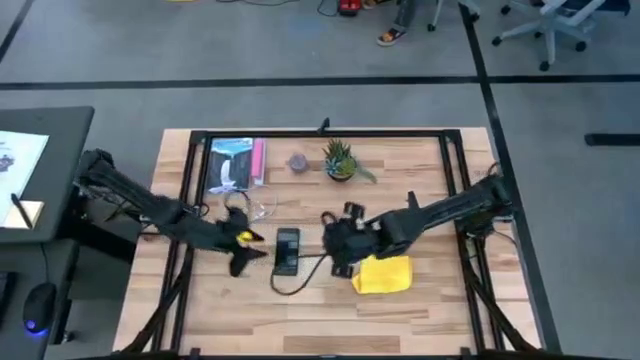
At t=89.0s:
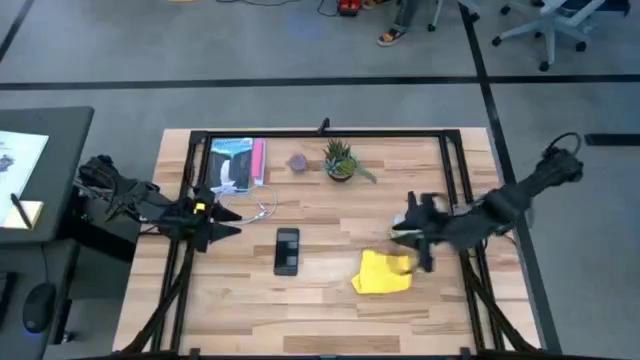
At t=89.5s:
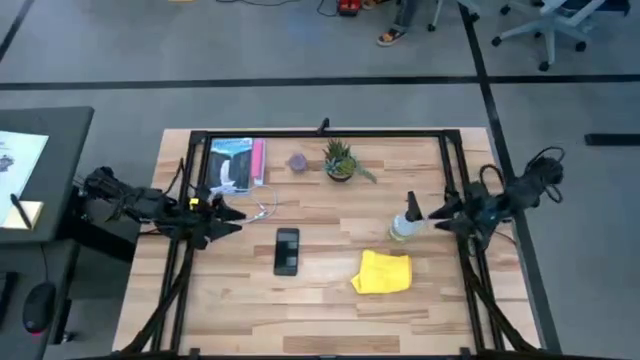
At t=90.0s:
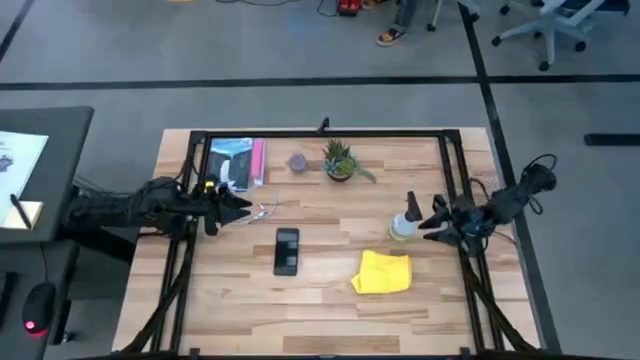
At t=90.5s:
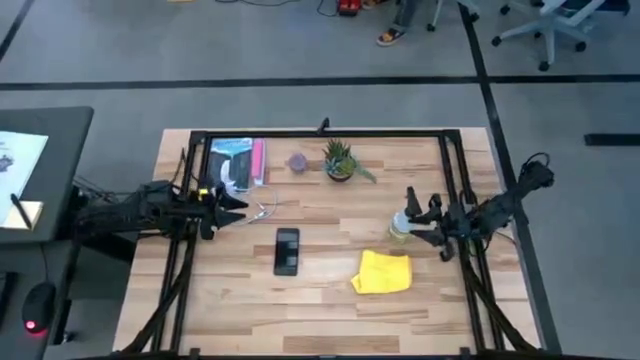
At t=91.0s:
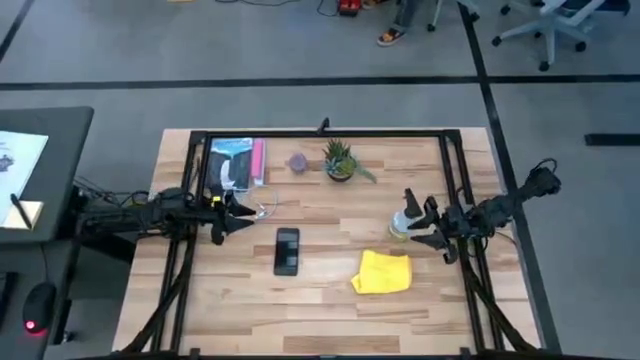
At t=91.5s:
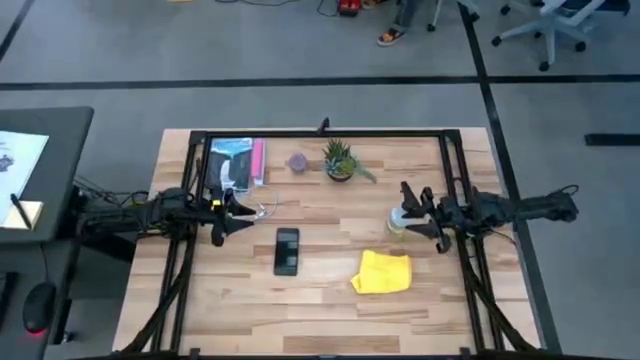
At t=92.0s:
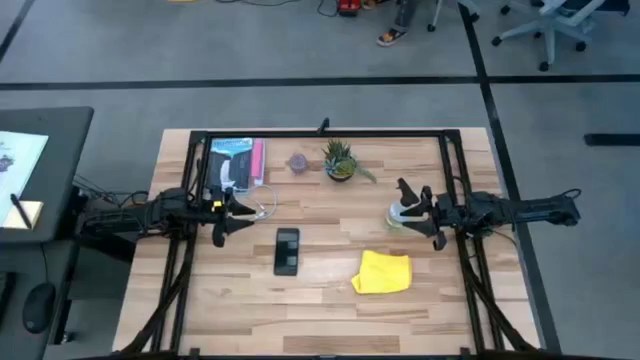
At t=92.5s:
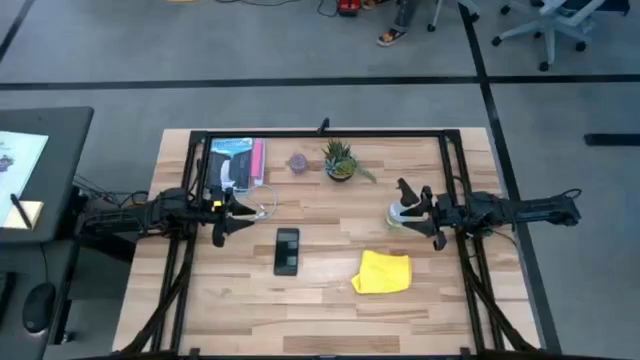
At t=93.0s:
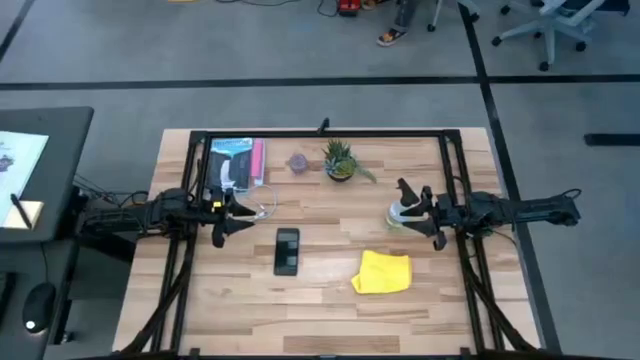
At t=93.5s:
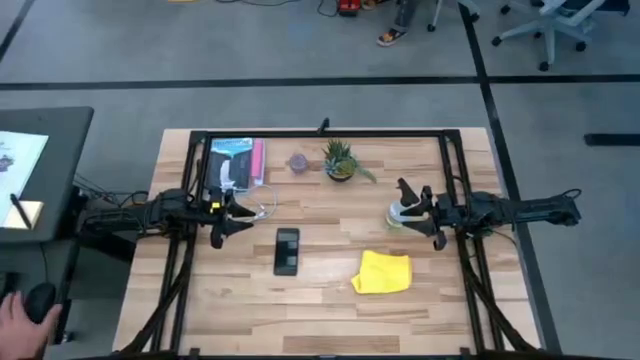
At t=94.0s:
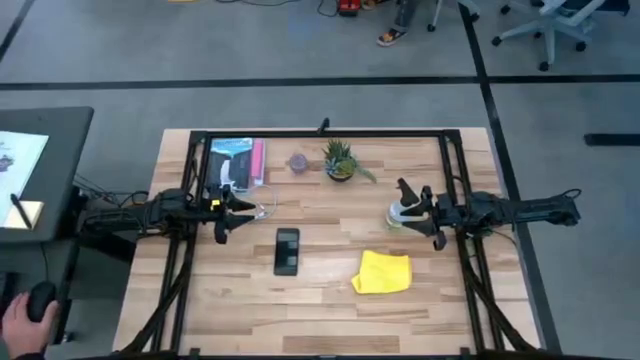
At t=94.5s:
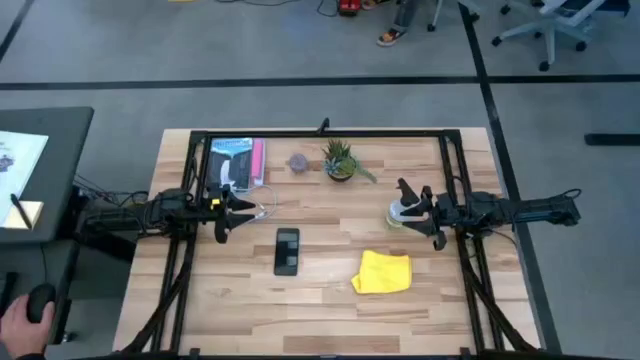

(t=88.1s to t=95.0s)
Task: Apply microfiber cloth
Return to Home Position

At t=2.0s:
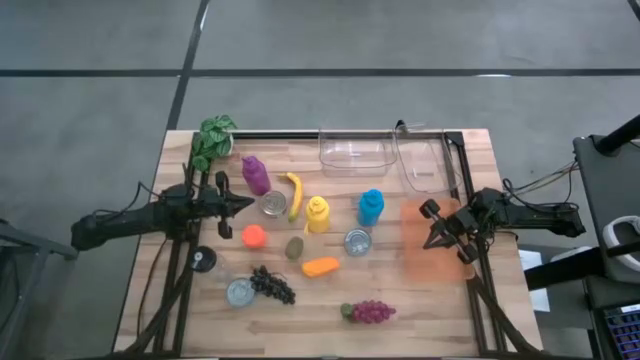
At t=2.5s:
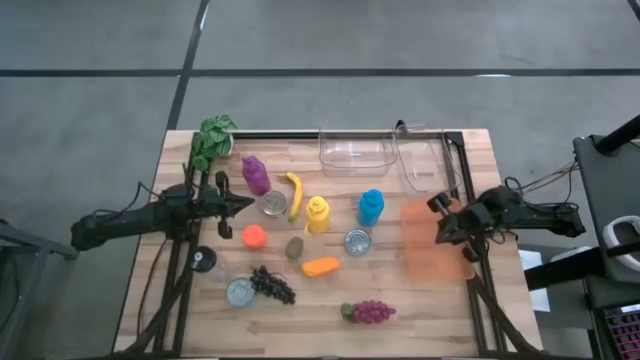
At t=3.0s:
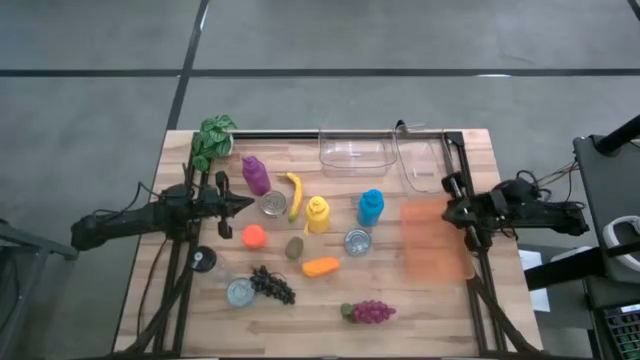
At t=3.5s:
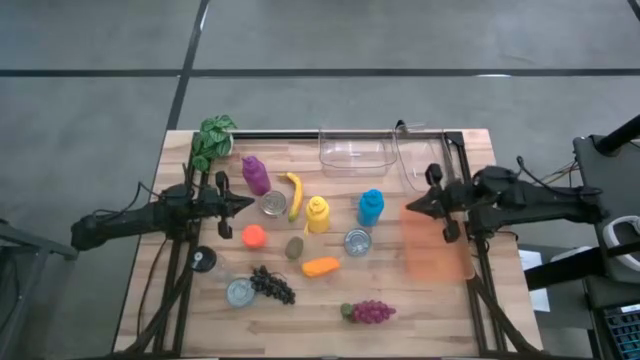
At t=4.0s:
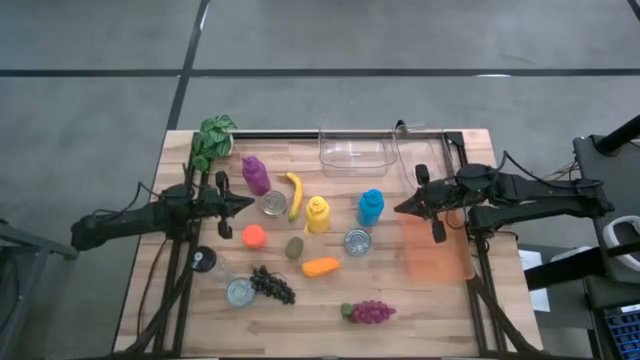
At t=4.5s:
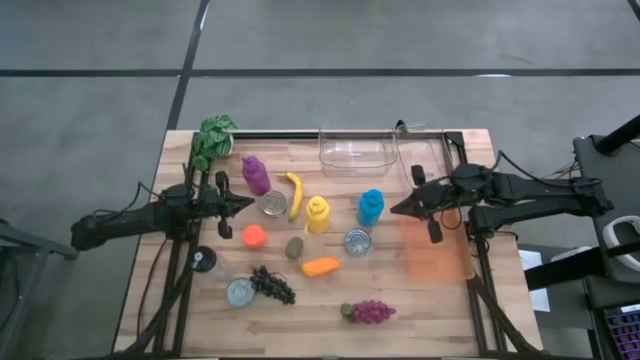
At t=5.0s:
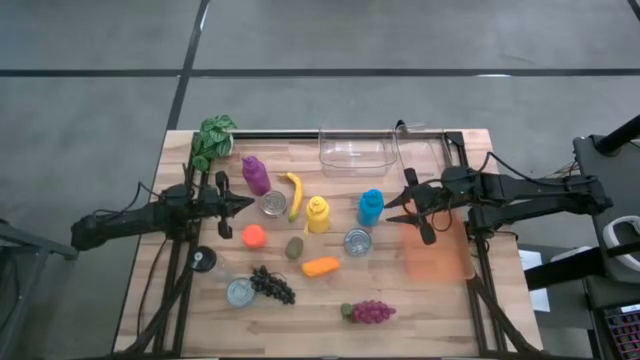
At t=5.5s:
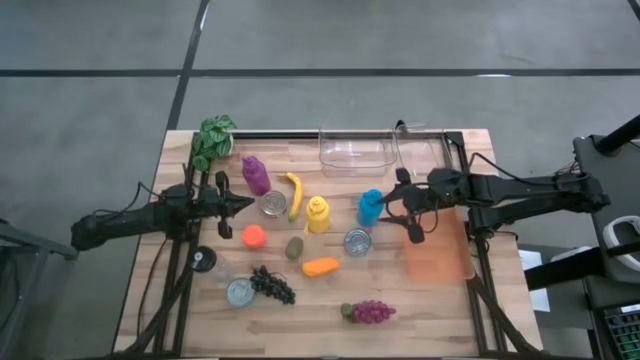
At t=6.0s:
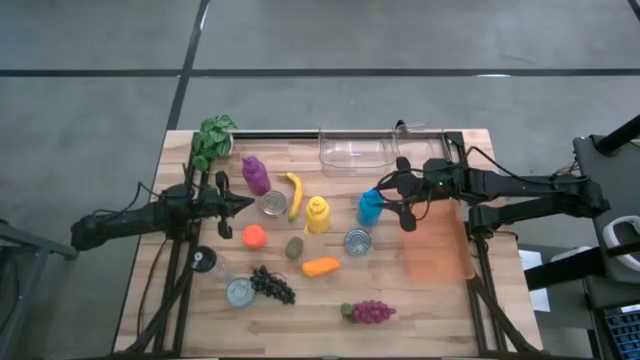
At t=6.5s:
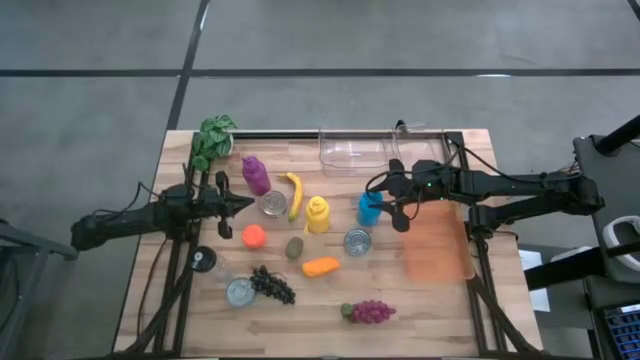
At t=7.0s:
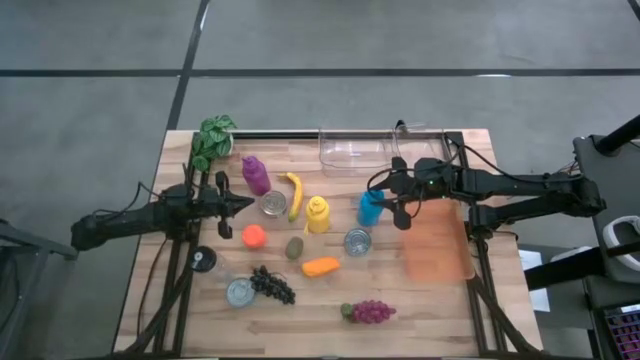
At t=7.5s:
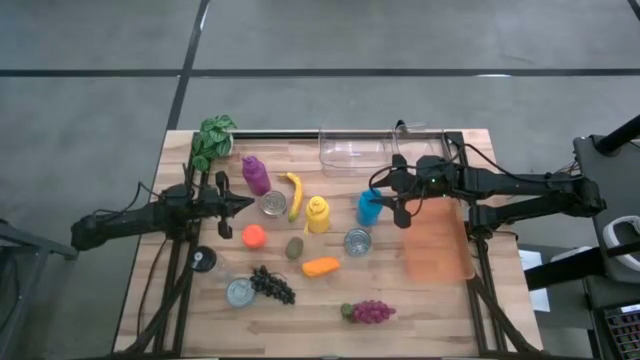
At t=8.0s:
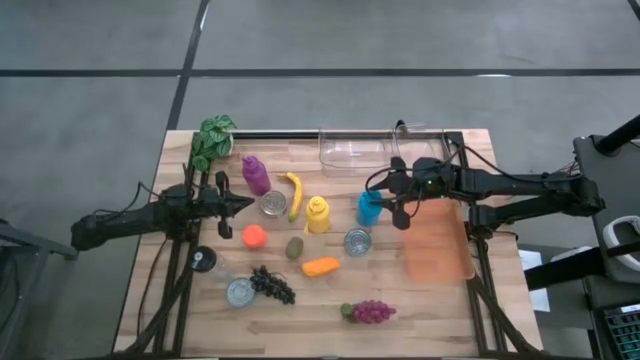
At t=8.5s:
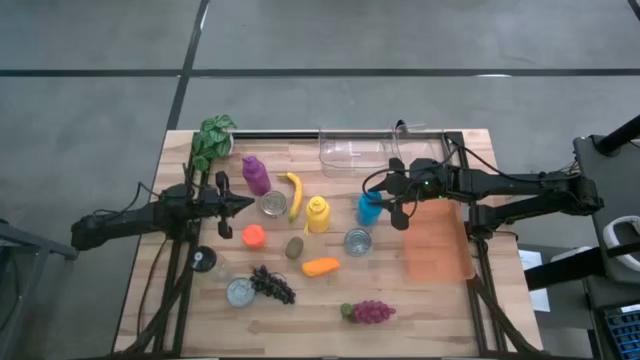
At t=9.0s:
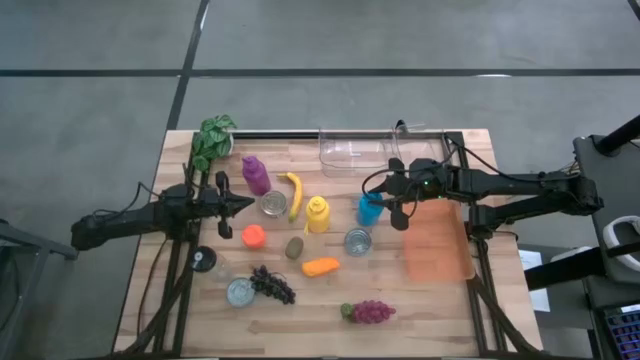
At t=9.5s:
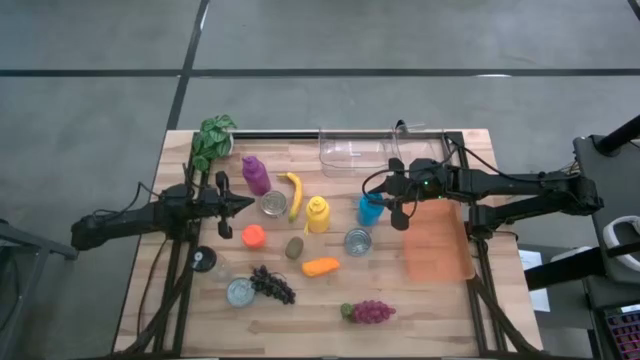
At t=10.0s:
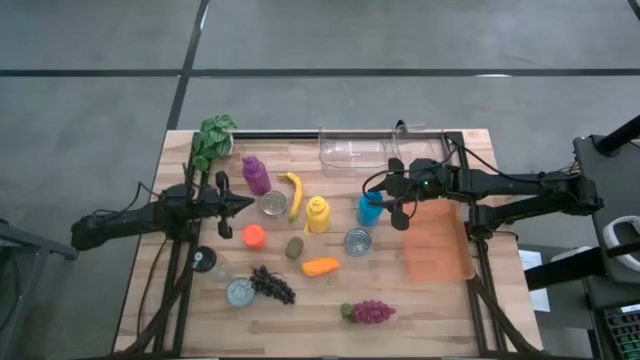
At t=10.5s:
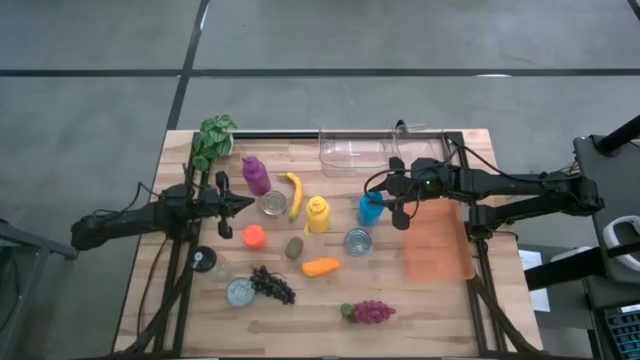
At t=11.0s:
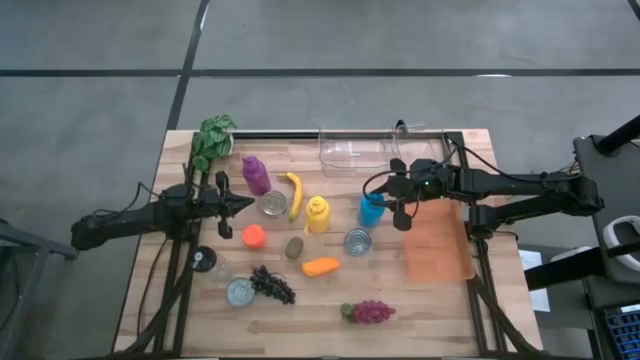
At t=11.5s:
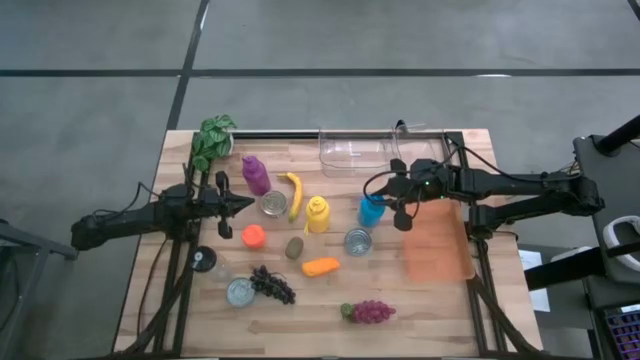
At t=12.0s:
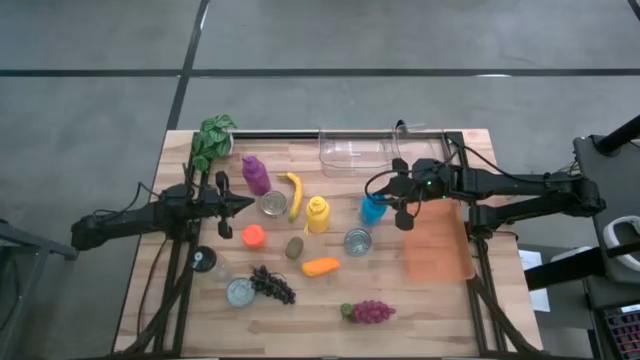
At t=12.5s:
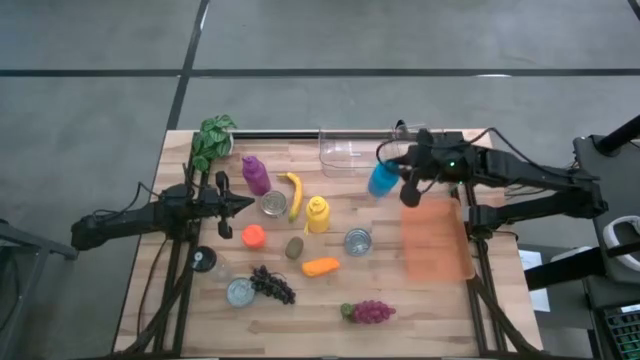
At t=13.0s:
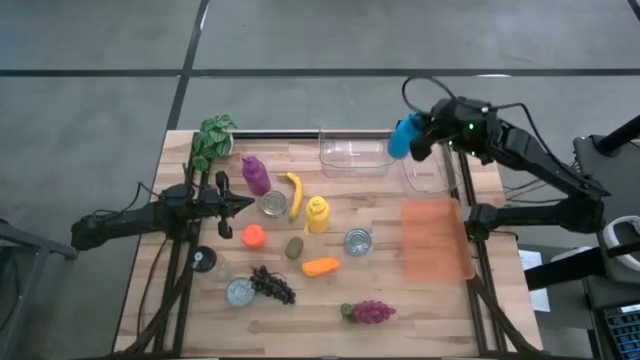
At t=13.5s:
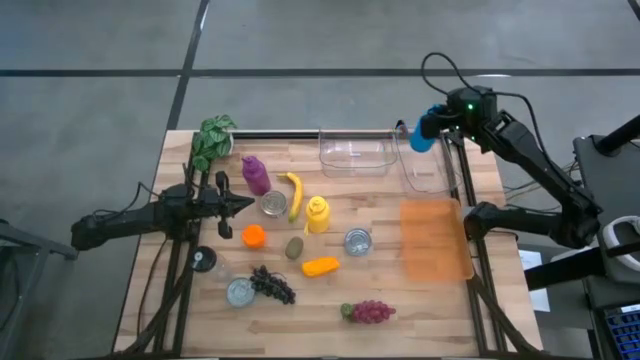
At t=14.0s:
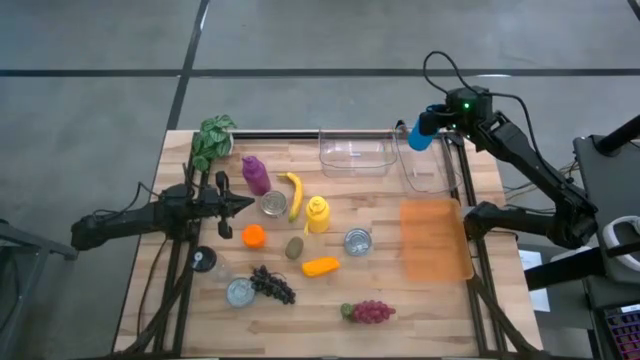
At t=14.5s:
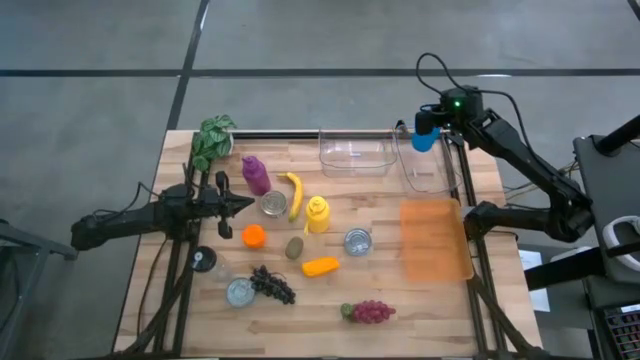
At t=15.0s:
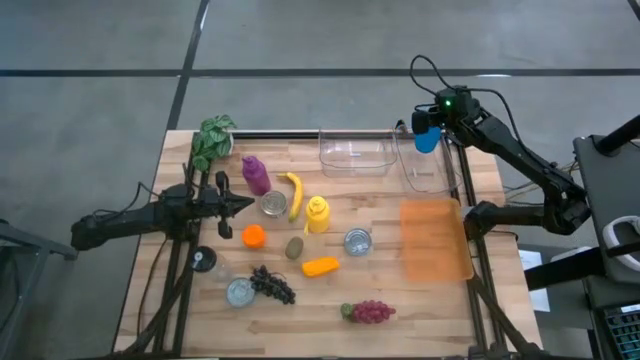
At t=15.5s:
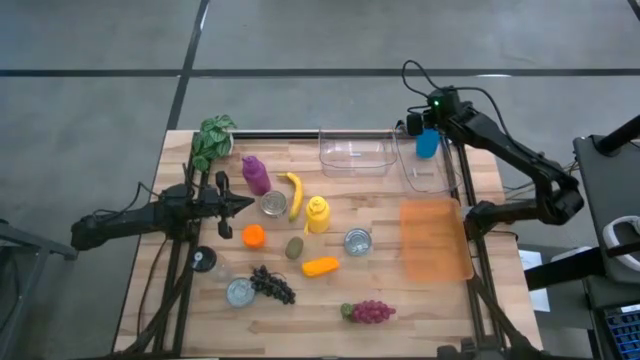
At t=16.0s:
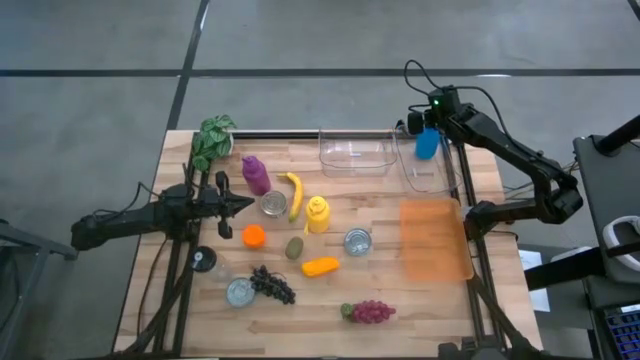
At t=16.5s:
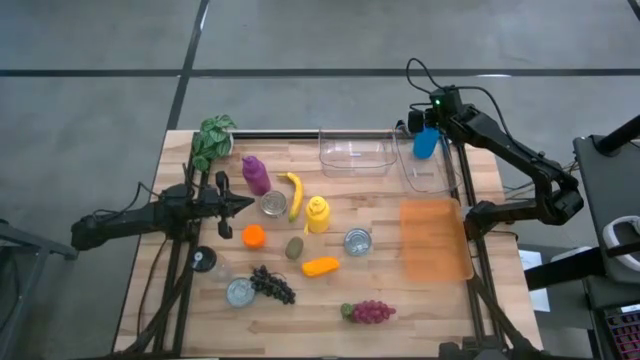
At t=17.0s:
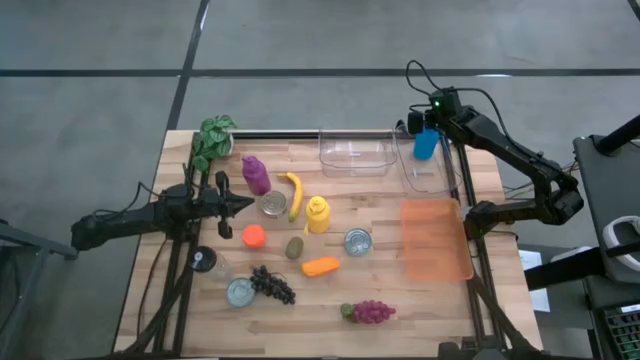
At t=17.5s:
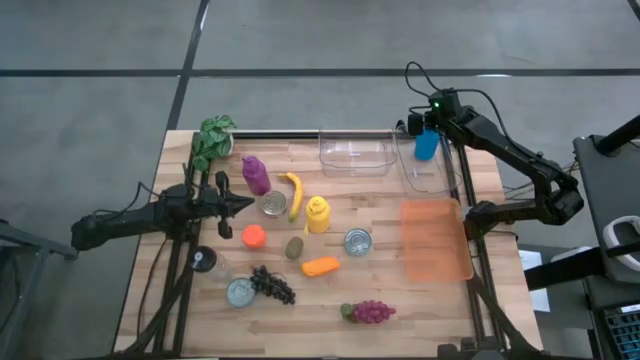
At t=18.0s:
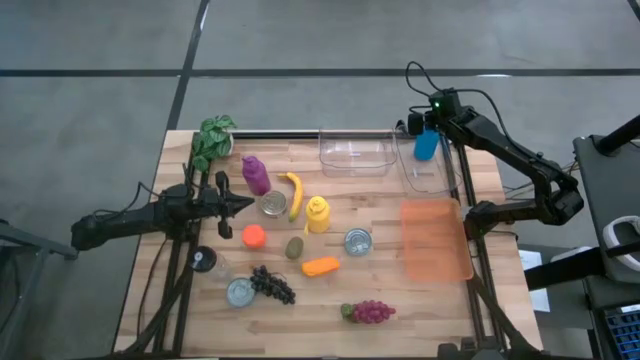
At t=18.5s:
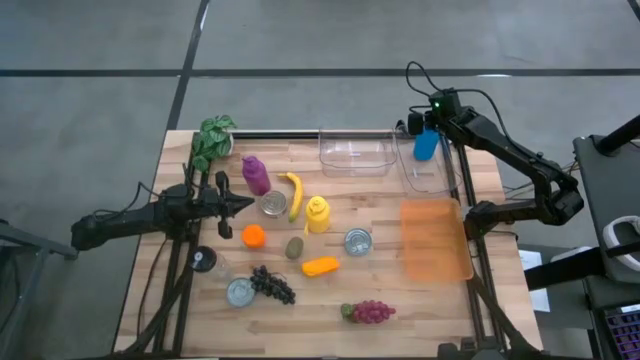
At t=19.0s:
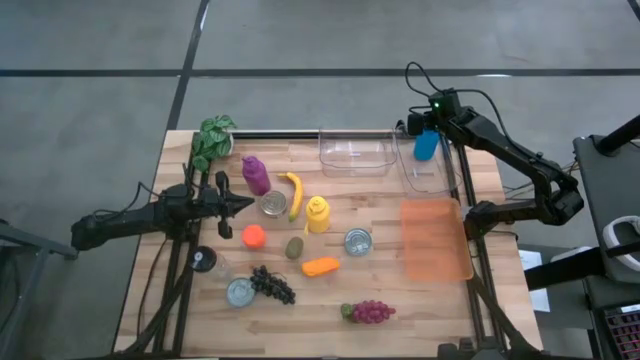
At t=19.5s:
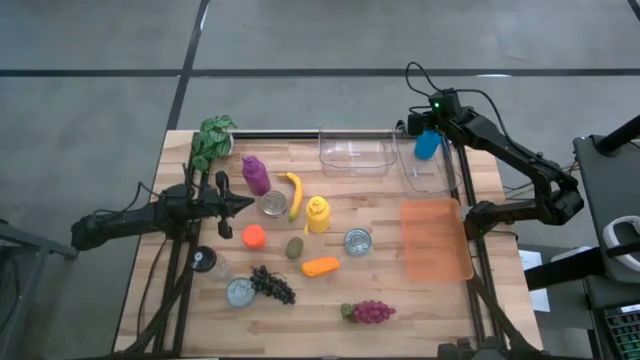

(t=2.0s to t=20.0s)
Task: Pick & Place Food Item
Put the blue water bottle into the right transparent bin
